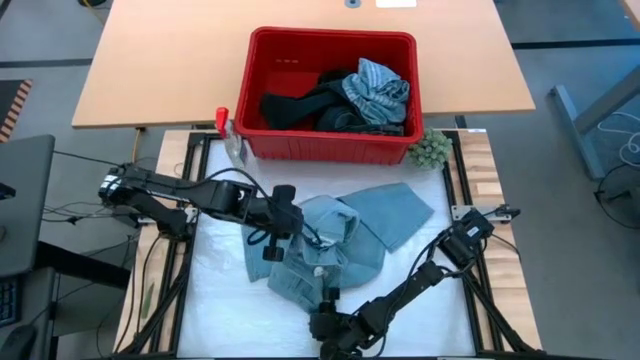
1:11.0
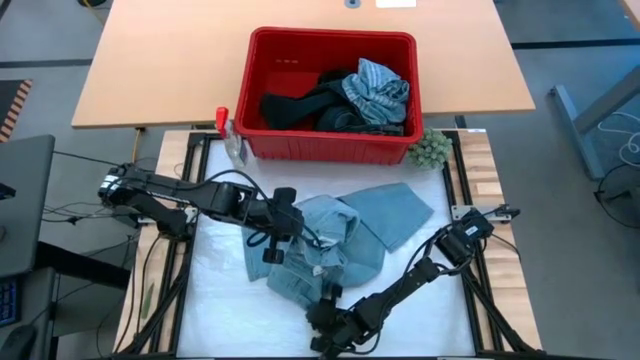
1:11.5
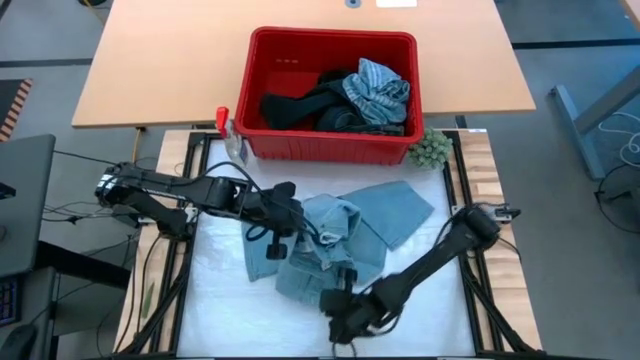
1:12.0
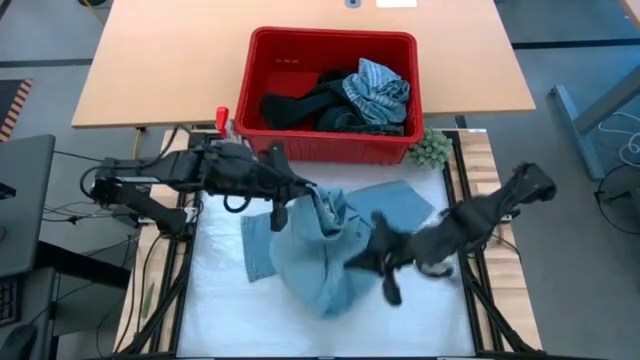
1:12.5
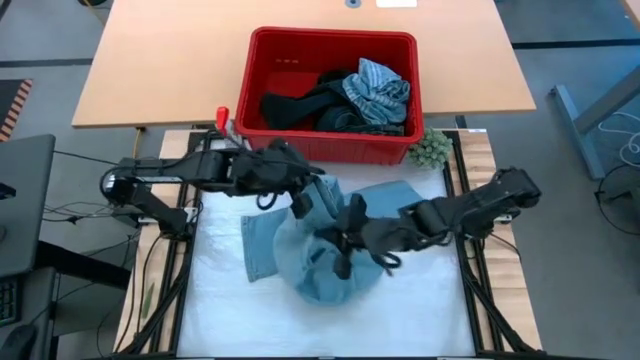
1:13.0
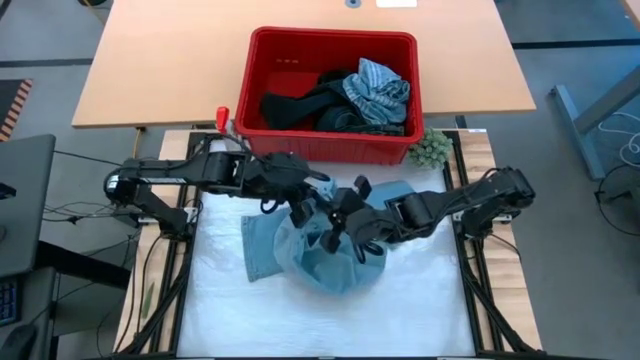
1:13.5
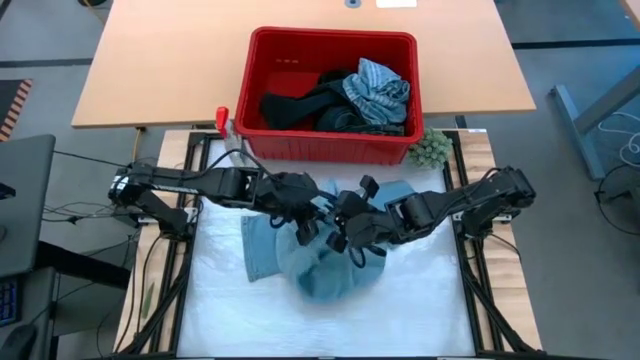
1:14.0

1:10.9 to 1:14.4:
Task: Fold laundry
Fold the blue pants from the red laundry bin

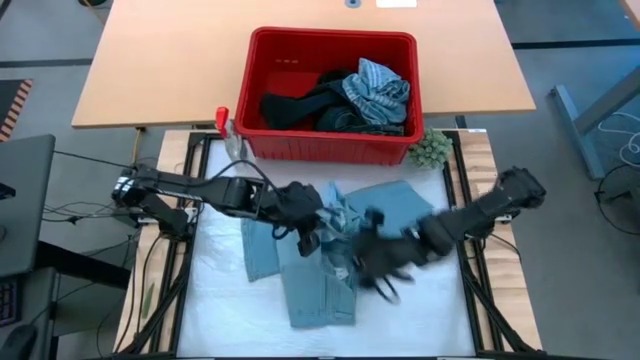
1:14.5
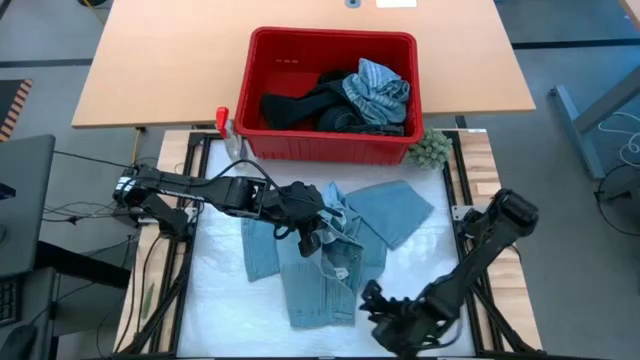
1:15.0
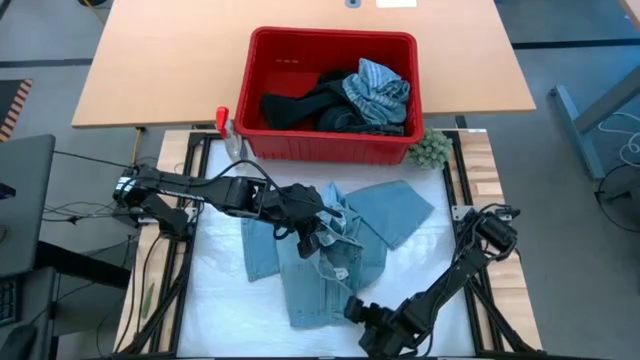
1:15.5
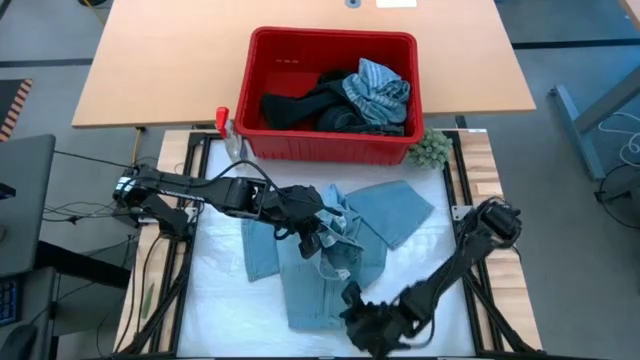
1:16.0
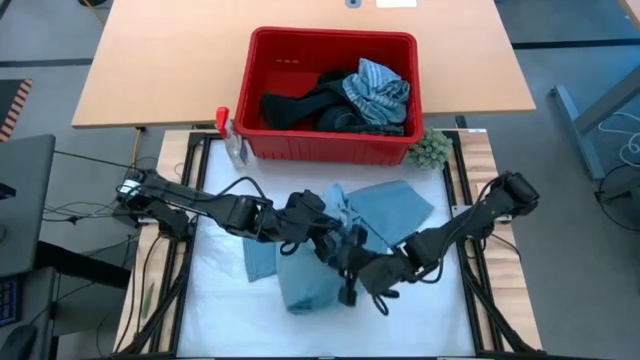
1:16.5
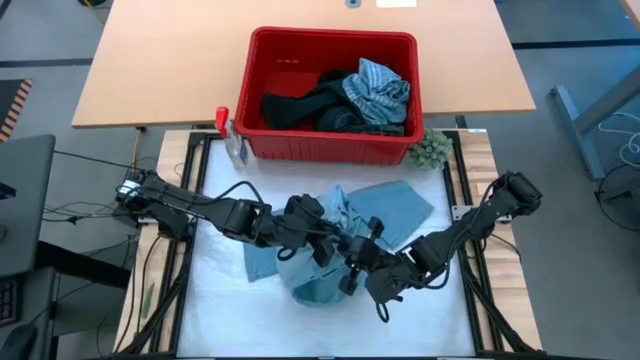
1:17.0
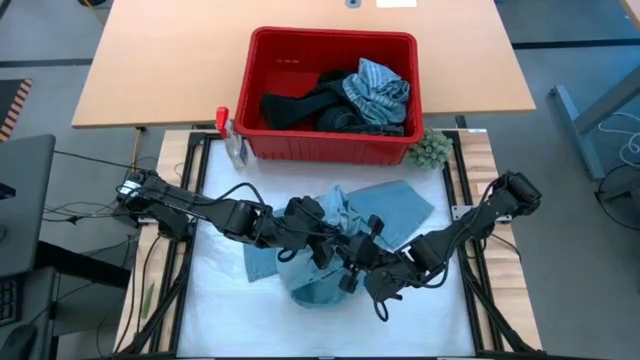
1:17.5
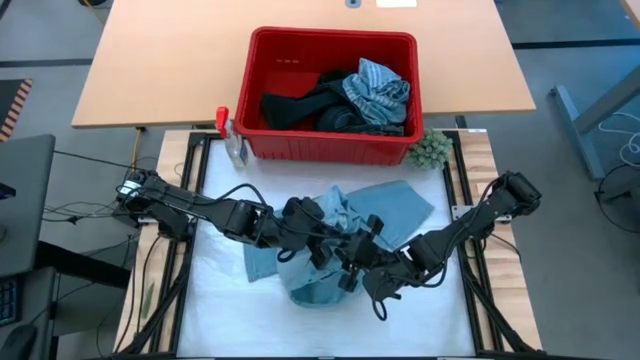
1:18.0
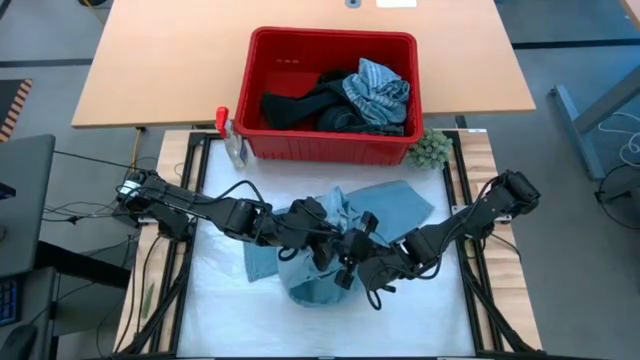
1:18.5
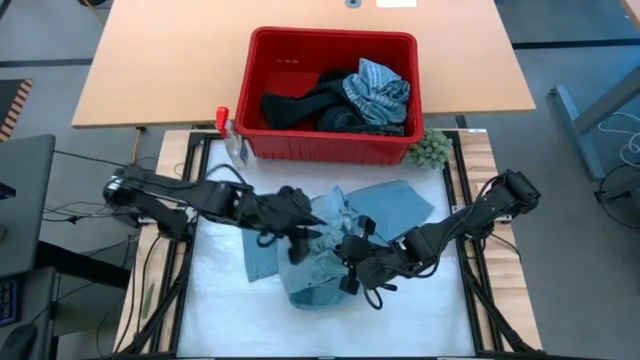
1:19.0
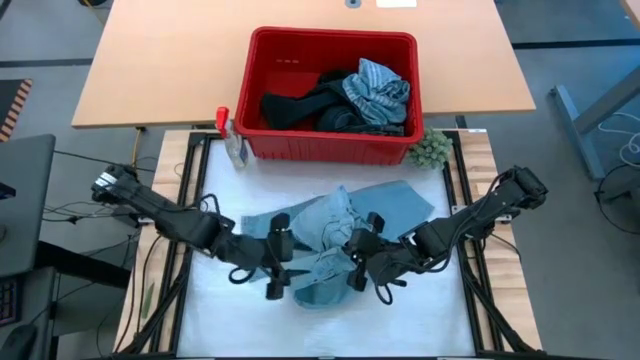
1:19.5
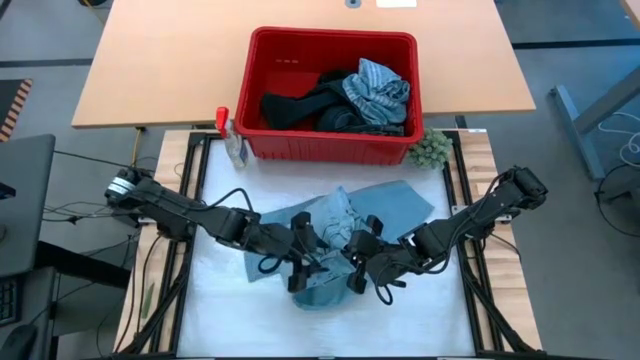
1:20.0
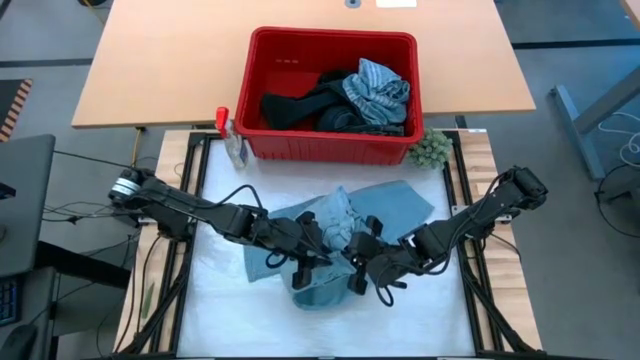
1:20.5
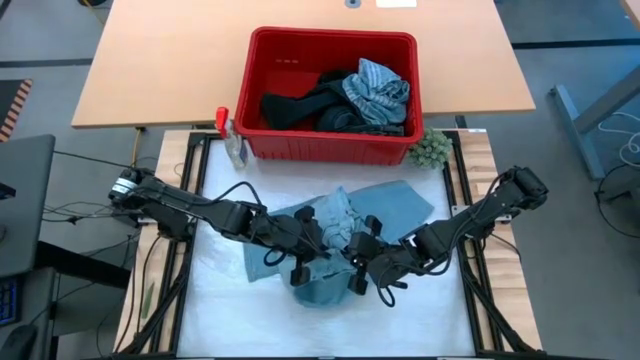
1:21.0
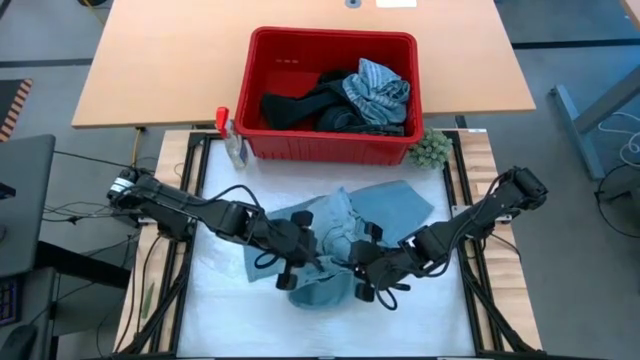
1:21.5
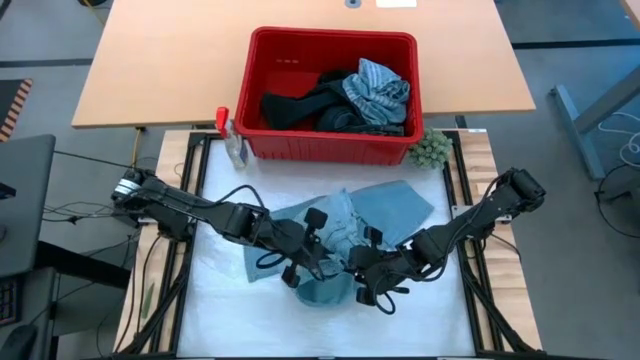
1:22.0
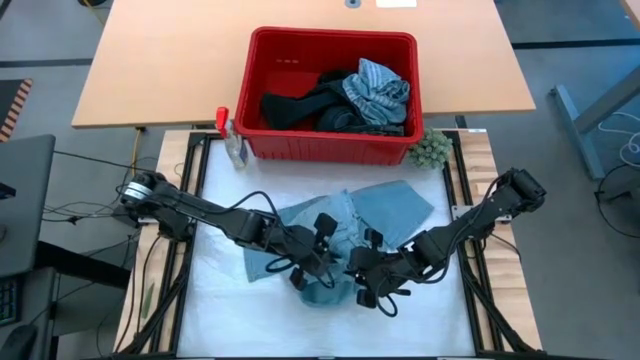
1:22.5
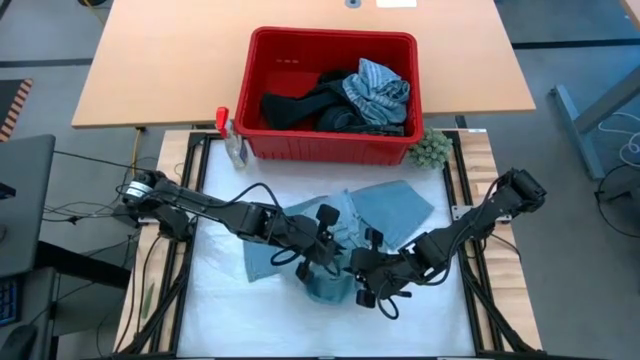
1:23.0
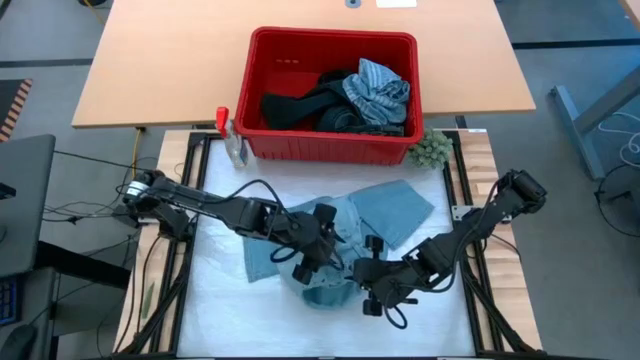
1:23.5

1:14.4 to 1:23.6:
Fold the blue pants from the red laundry bin

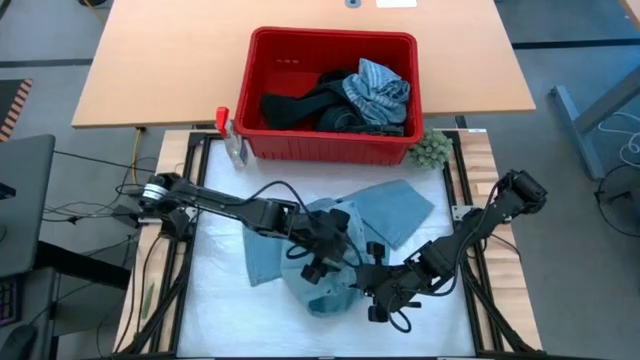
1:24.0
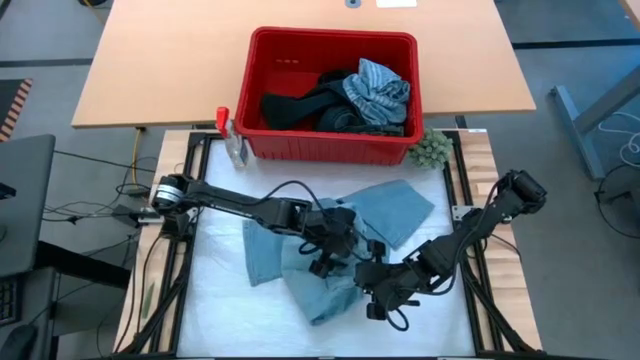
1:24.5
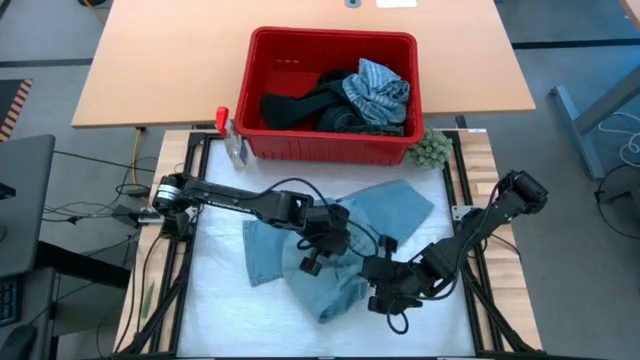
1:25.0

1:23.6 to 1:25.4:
Fold the blue pants from the red laundry bin

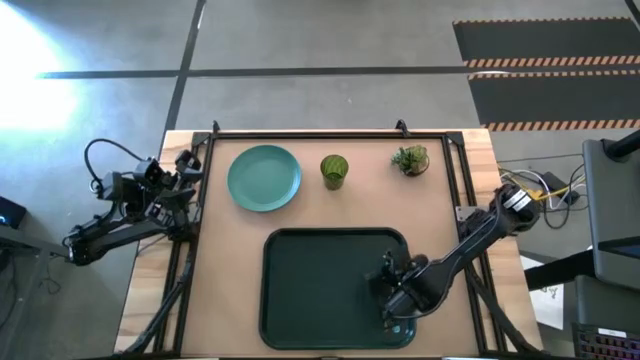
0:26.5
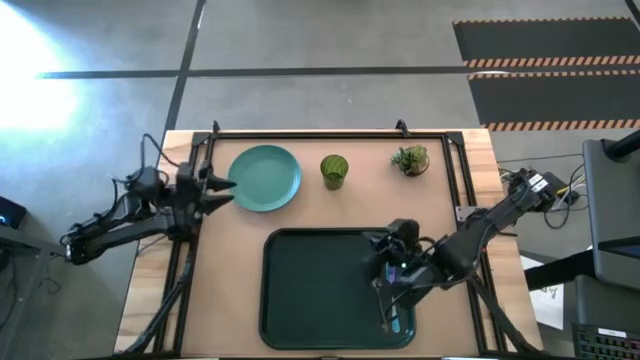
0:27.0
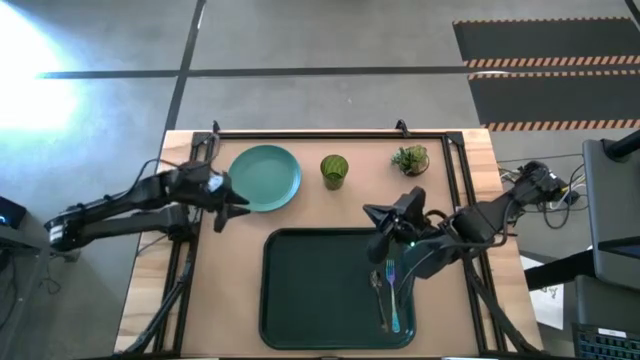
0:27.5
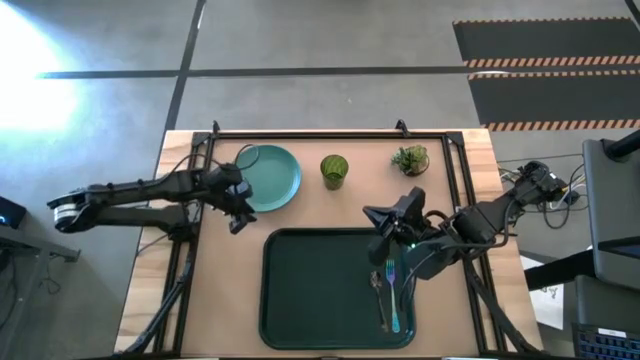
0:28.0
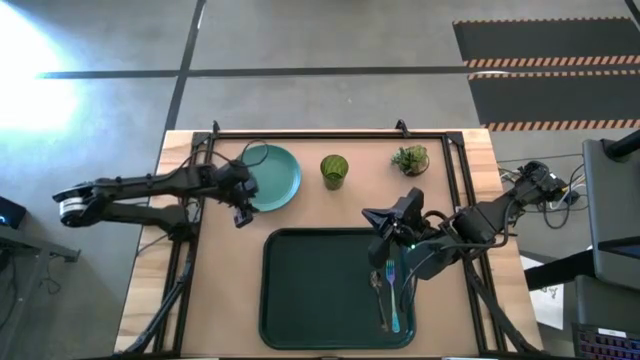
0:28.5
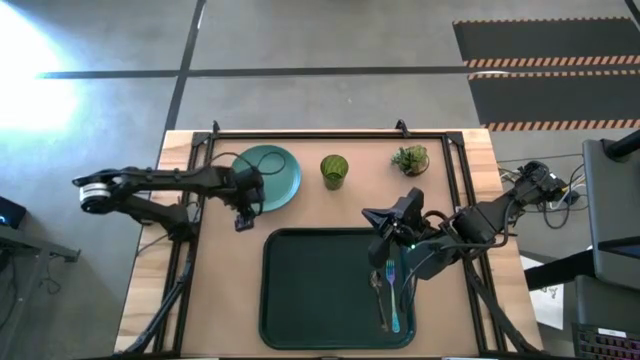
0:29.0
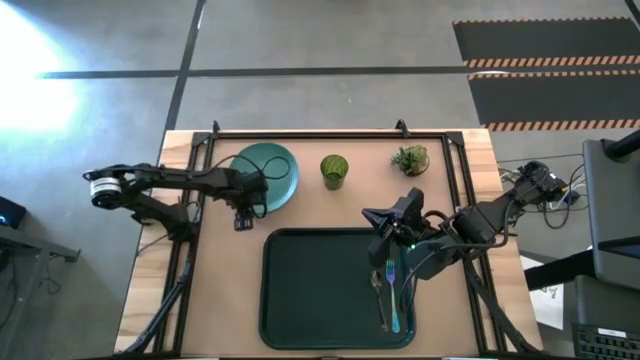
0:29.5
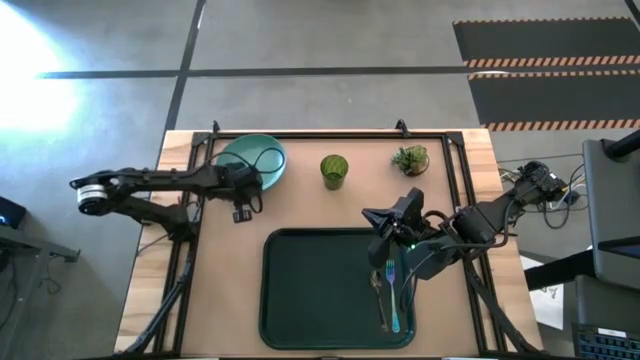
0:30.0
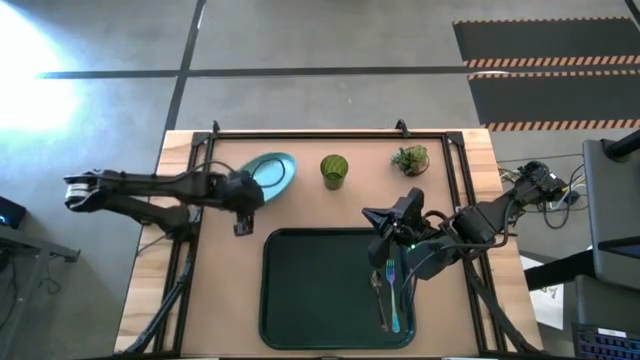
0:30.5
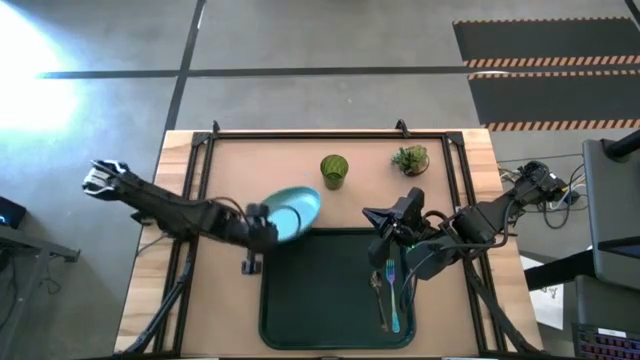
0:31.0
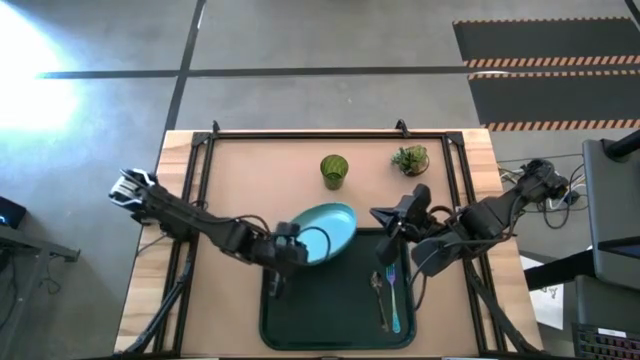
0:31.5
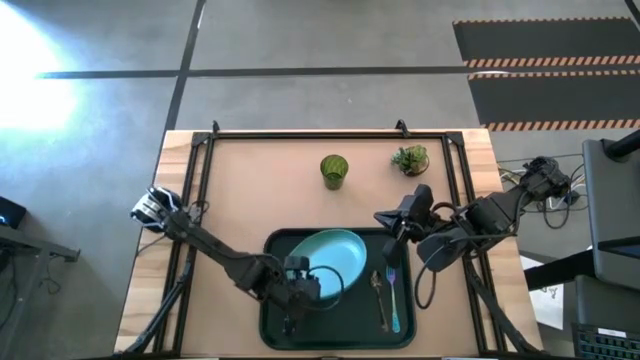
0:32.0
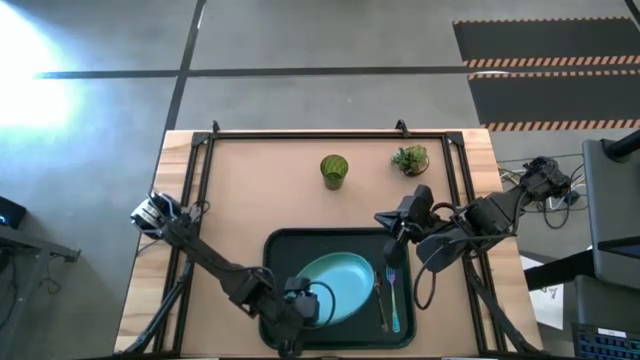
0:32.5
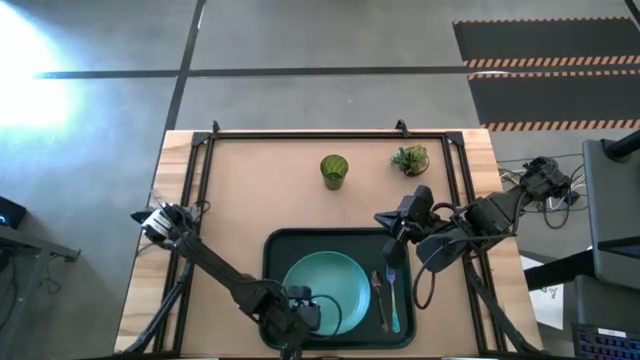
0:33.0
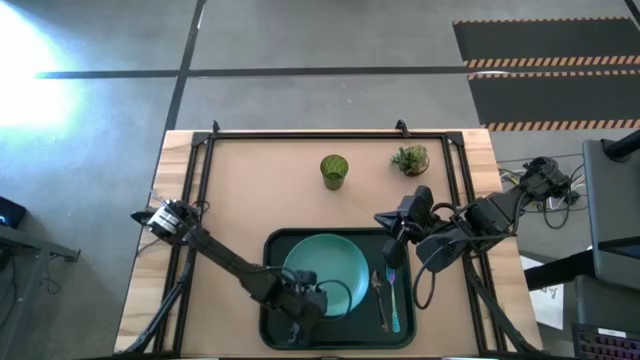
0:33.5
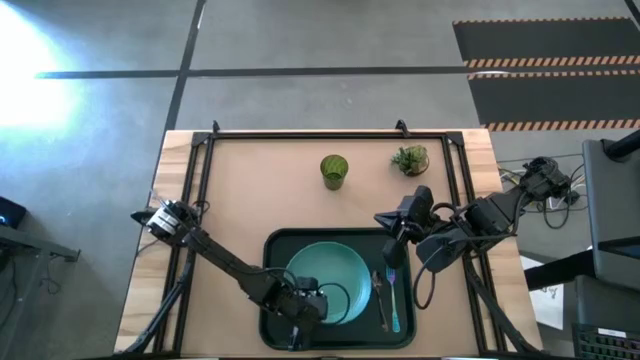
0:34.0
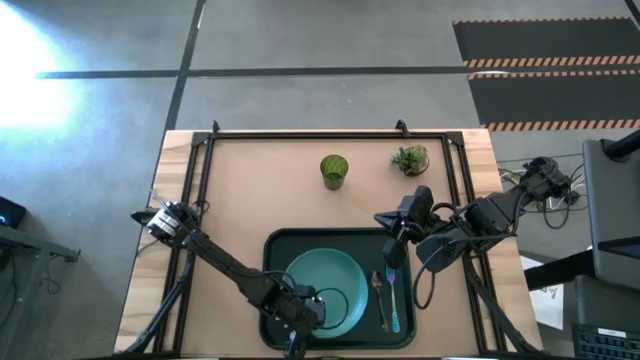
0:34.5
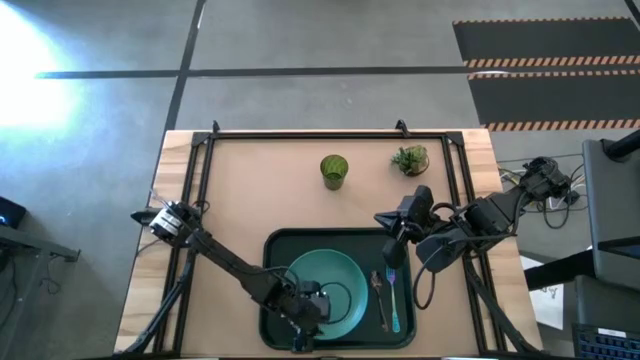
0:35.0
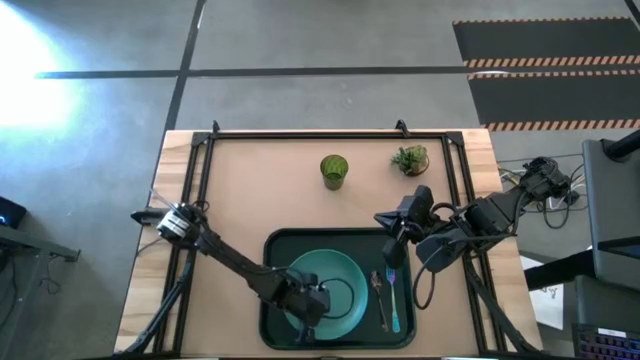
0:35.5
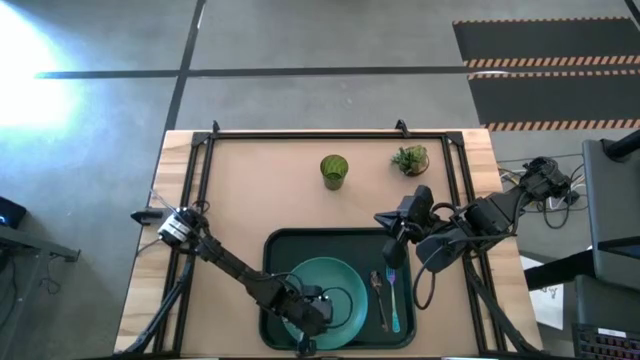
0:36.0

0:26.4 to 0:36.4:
Task: Pick and place plate/cup/fork/spoon on tray
Put the light green plate on the serving tray beside the spoon
